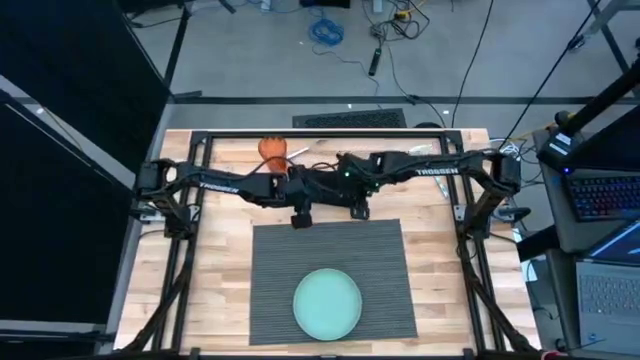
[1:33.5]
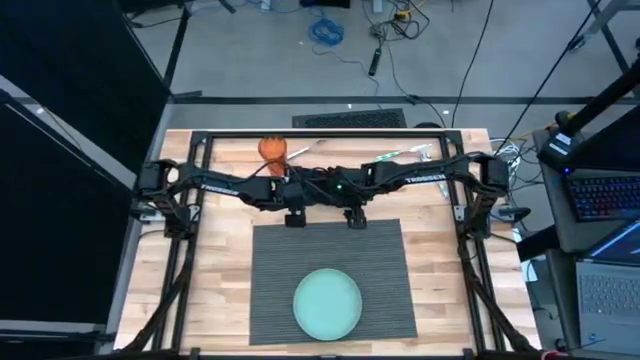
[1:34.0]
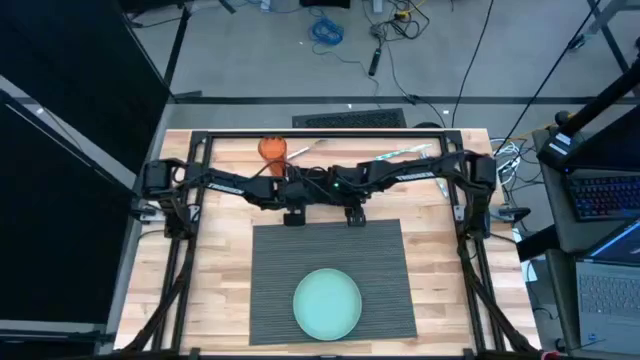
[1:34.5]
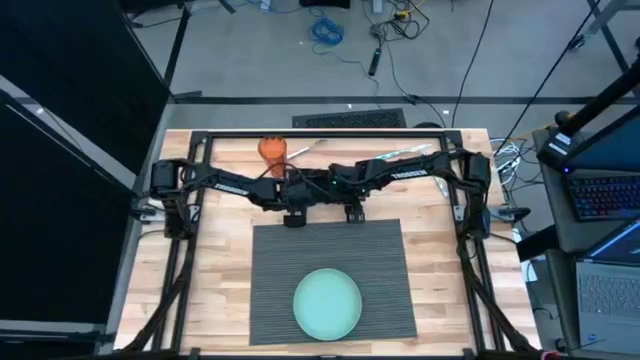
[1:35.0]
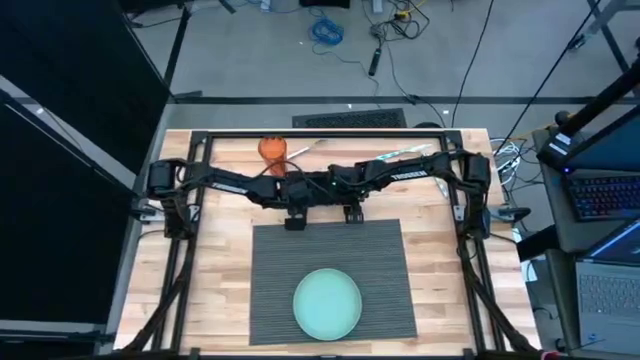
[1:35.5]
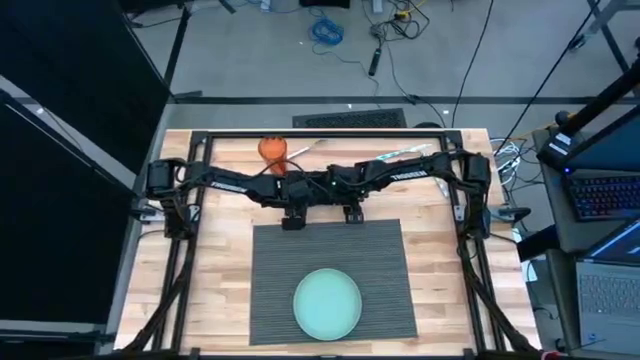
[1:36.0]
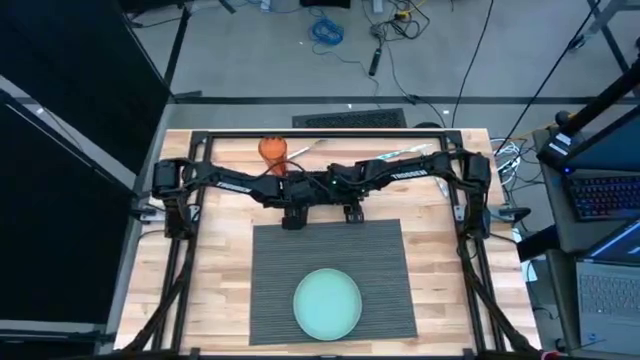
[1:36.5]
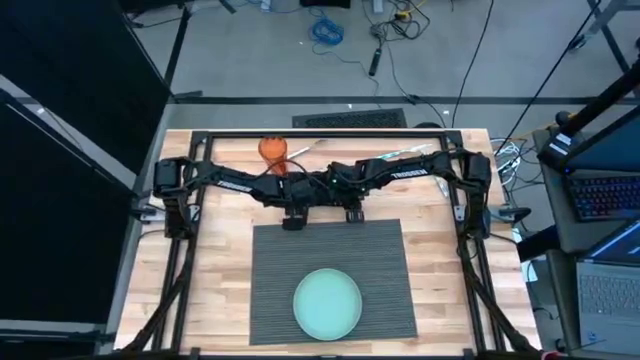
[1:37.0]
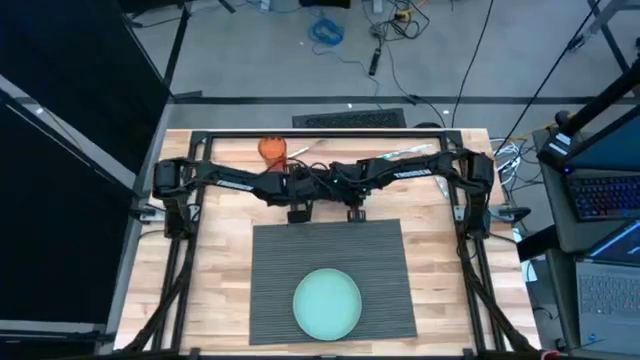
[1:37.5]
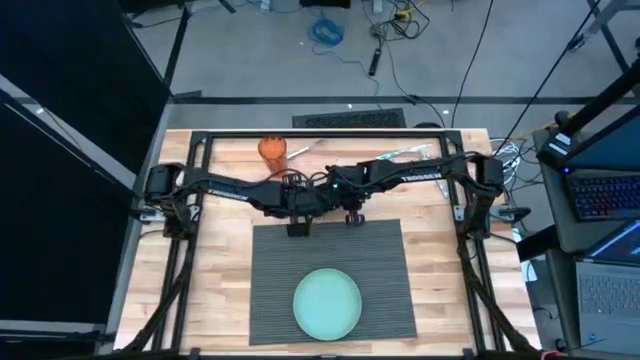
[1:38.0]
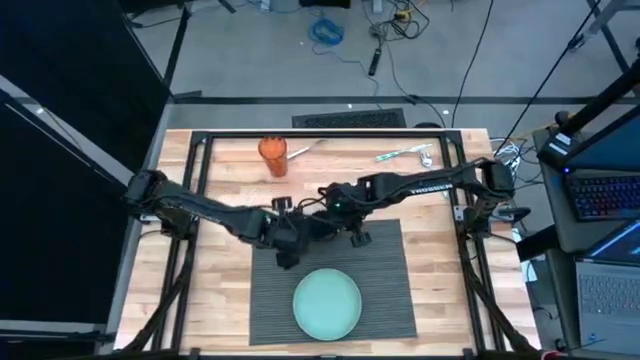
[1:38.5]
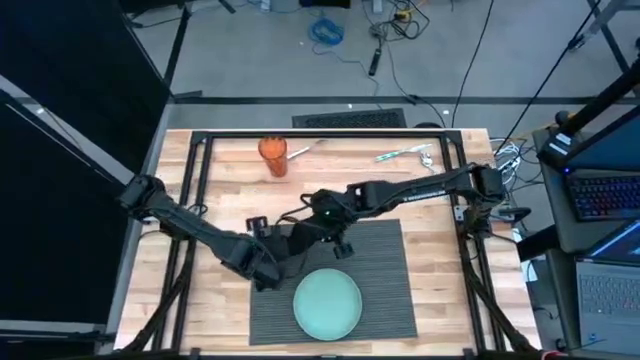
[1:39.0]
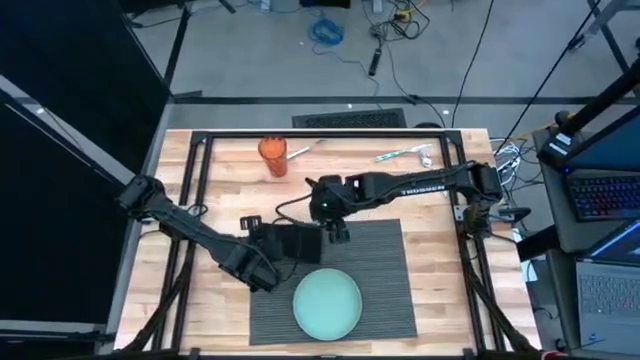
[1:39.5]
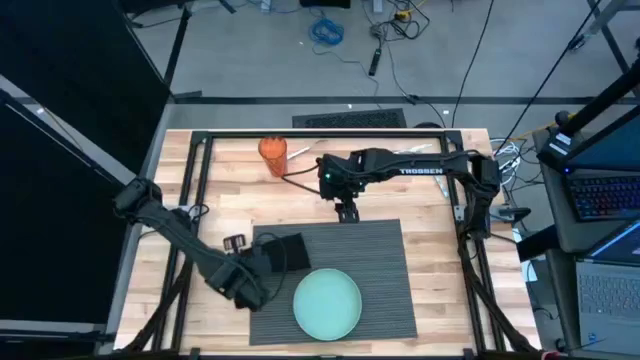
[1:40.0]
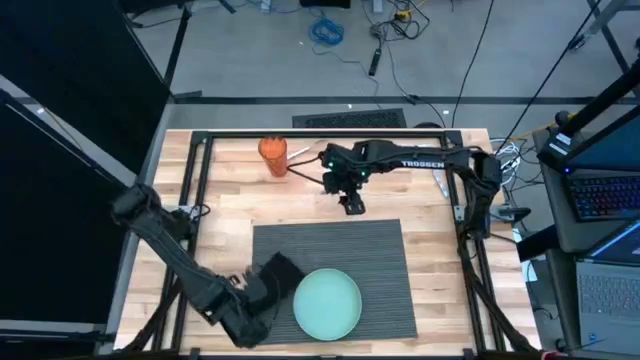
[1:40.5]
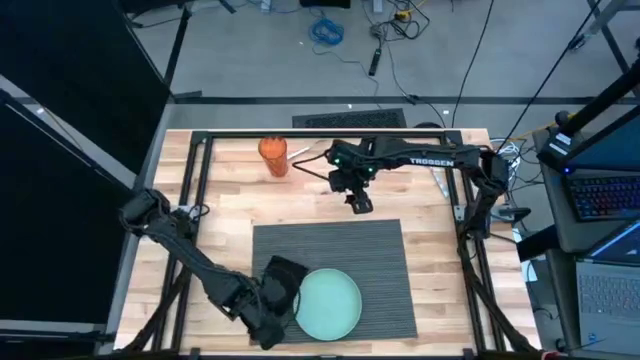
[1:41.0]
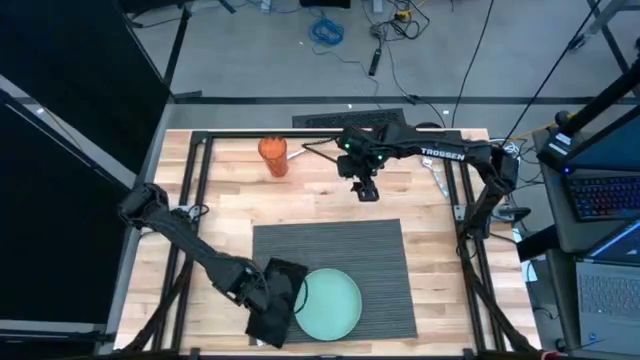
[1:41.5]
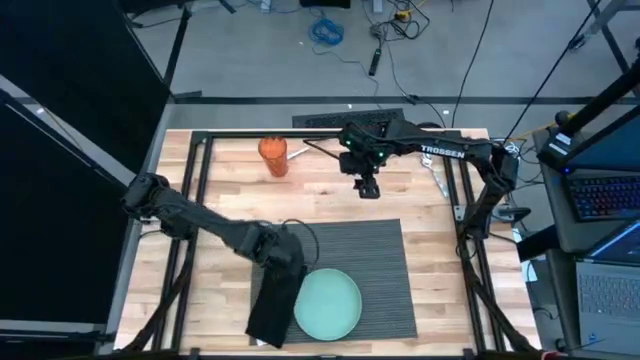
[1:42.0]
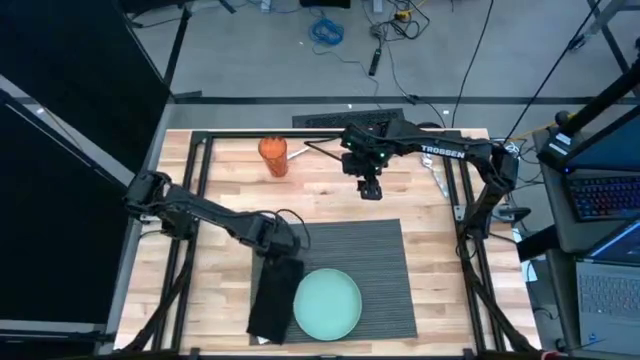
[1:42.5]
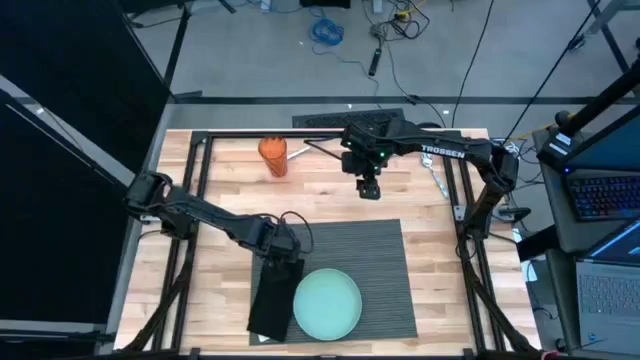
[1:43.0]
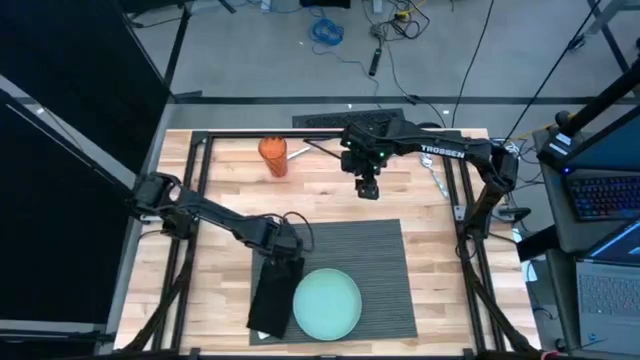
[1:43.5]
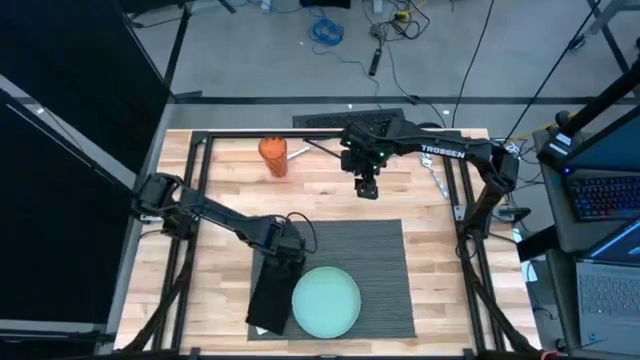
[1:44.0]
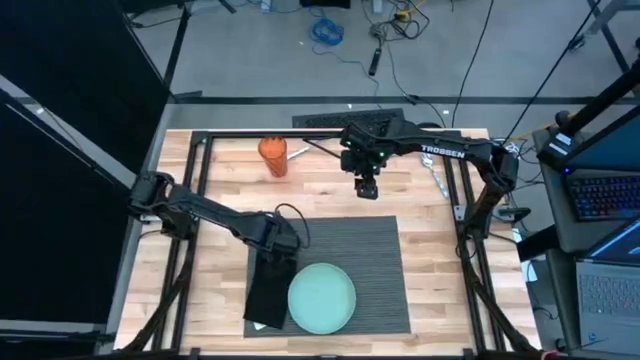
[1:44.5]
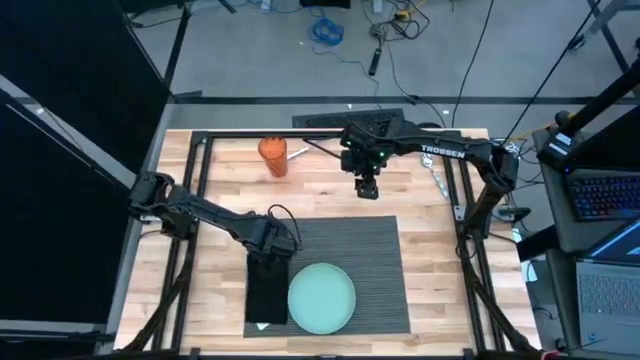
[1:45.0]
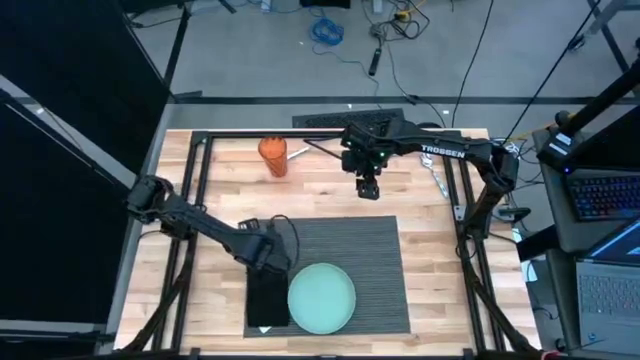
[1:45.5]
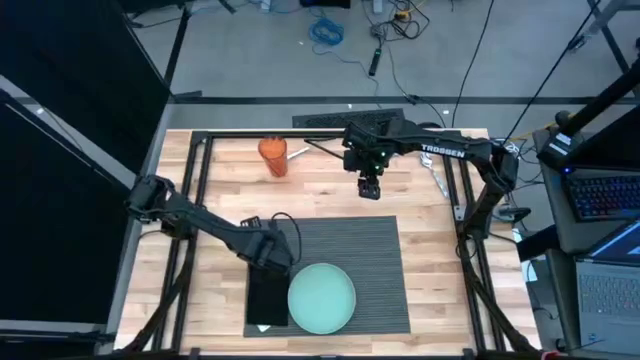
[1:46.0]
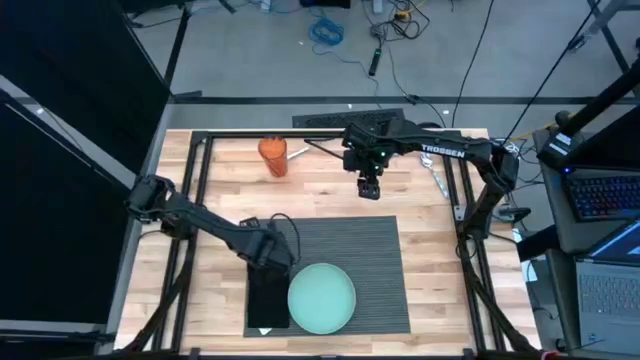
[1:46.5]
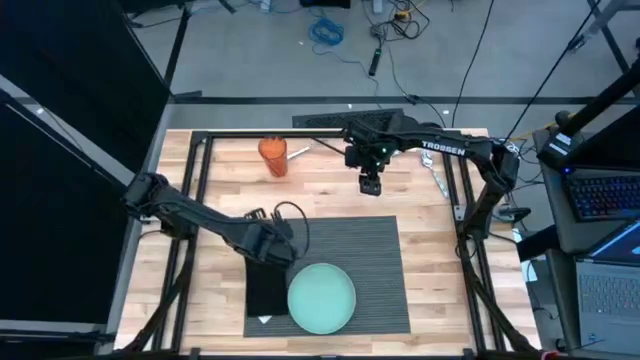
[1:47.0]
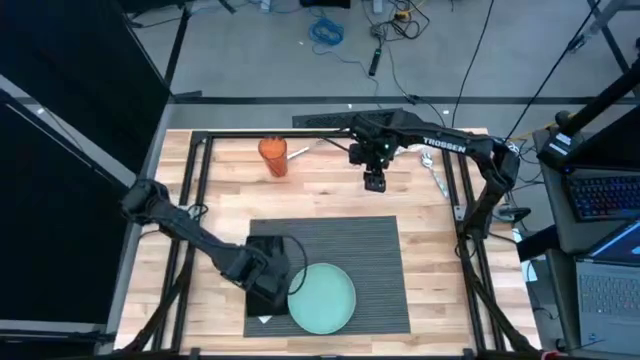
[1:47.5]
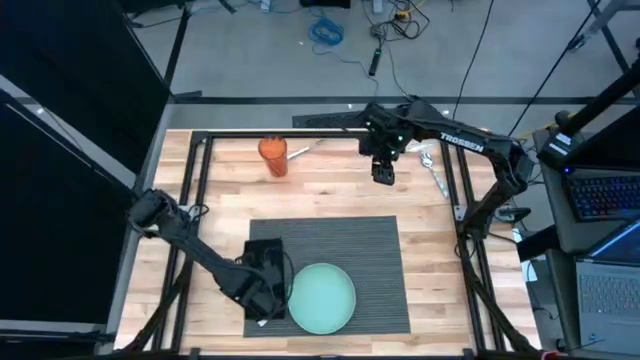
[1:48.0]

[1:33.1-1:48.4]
Task: Set table place
Put the black table napkin on the gray table mat

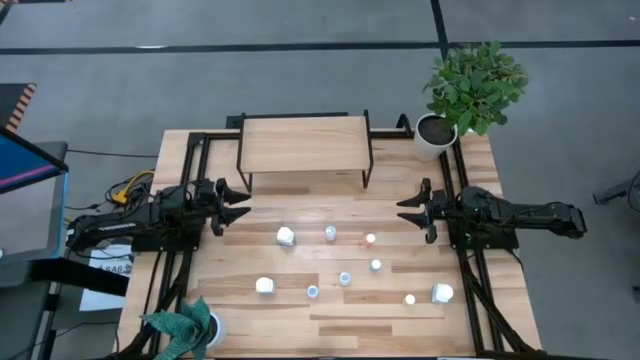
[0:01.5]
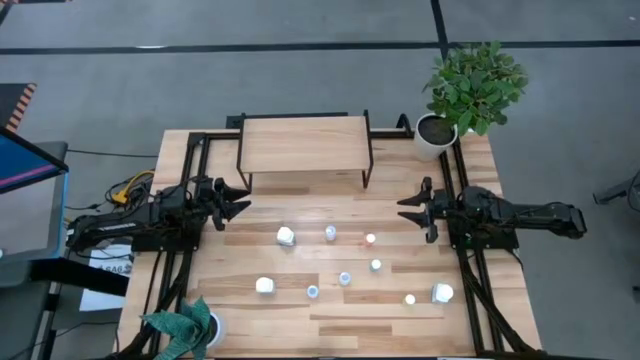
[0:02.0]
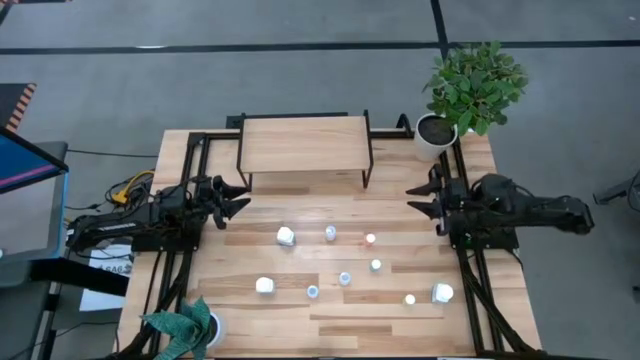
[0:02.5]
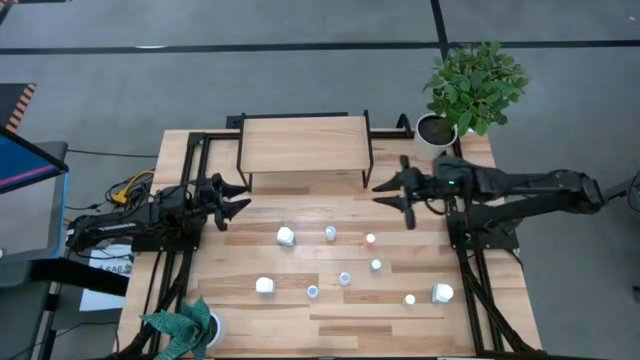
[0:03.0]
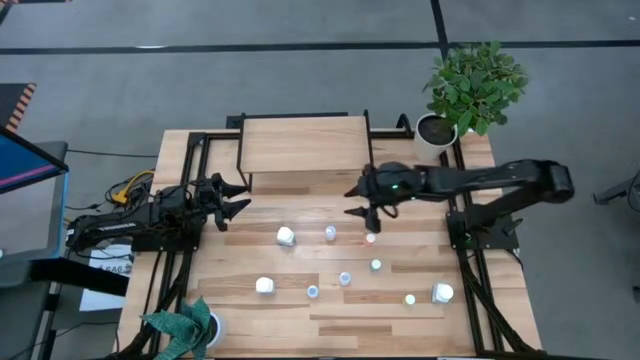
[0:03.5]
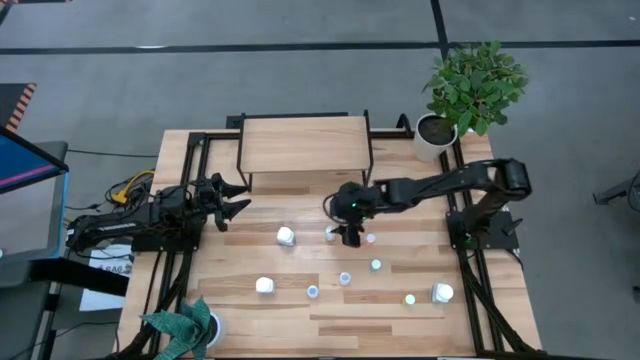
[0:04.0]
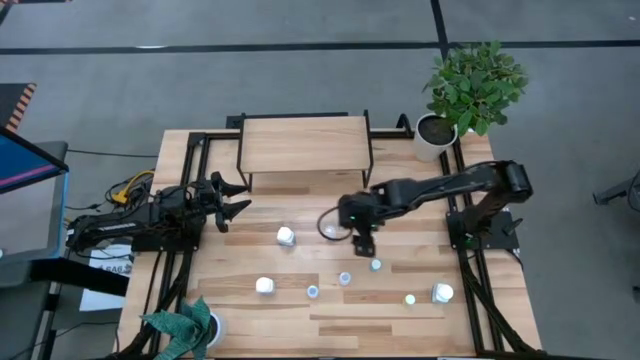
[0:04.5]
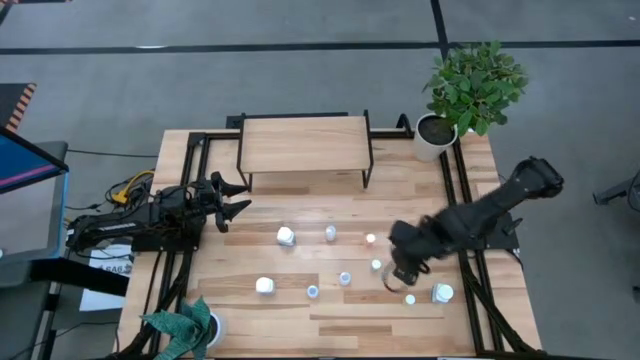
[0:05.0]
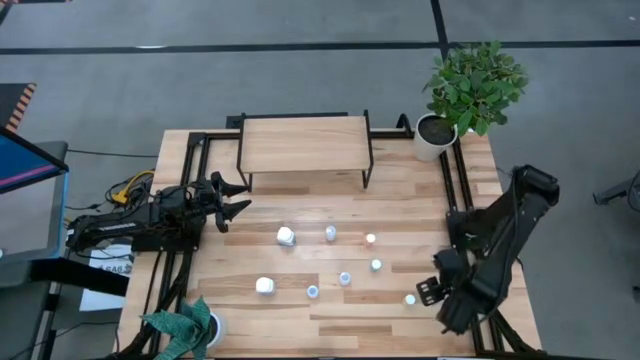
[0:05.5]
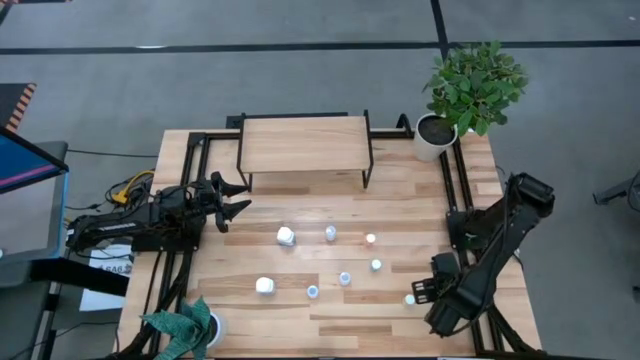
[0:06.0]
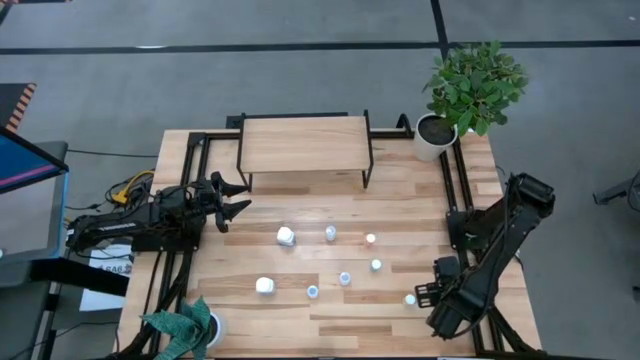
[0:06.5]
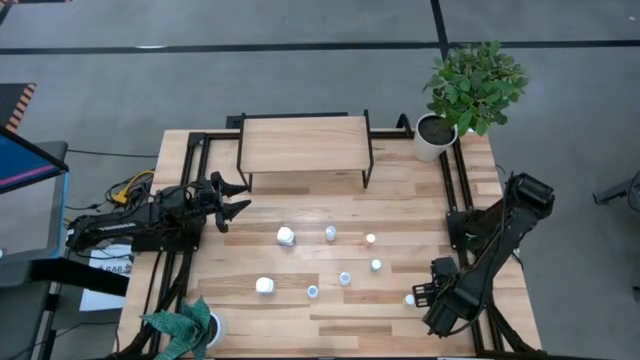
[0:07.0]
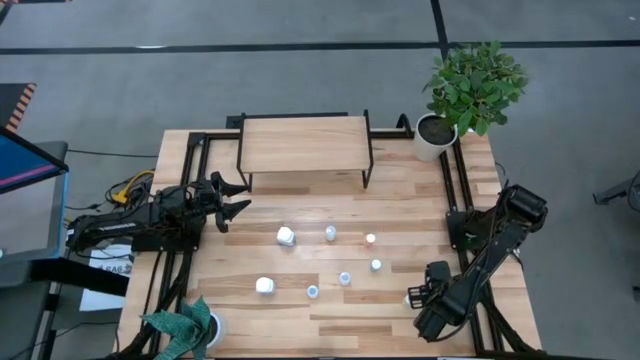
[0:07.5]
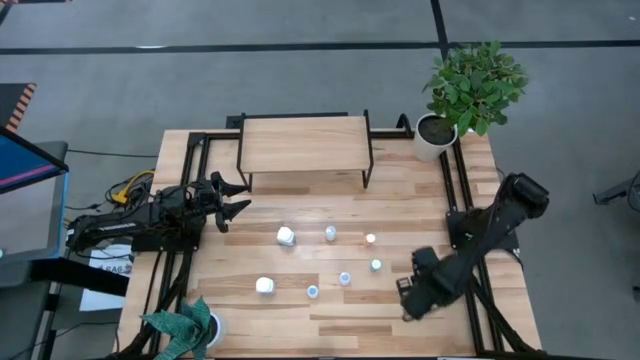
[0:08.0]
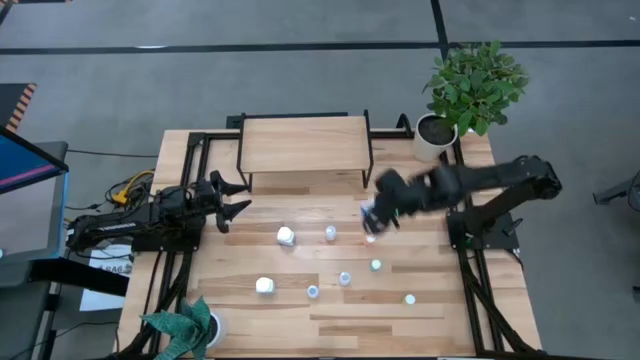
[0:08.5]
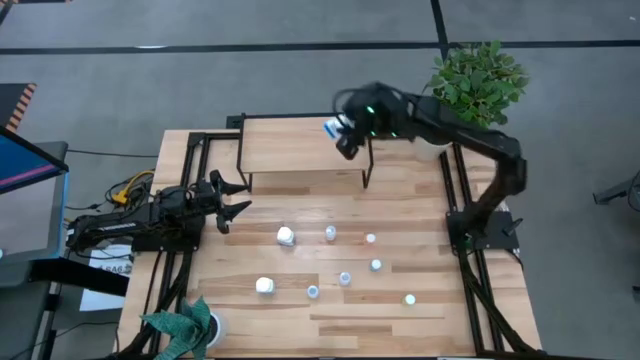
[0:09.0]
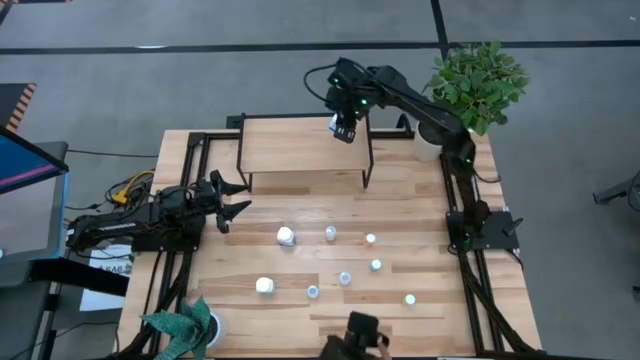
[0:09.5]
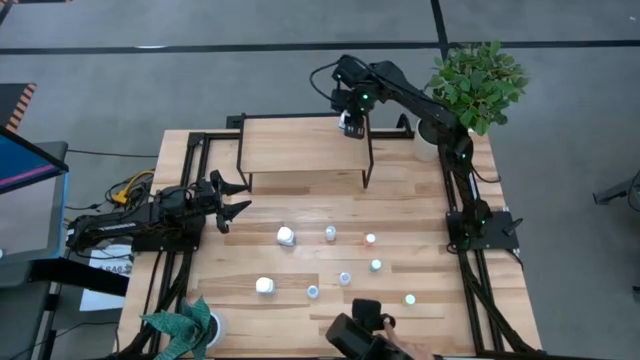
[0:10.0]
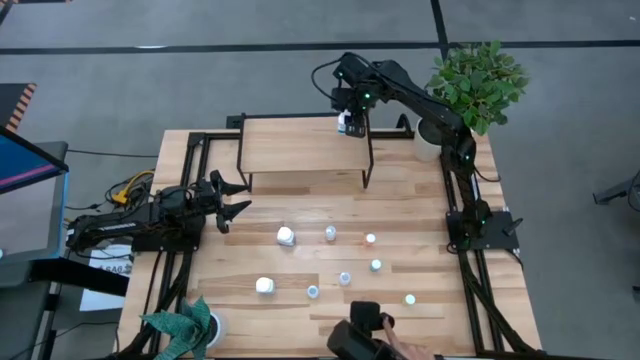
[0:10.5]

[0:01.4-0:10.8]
Task: Pick and place medicine bottles onto shelf by color
Put the right white pill bottle on the shelf
